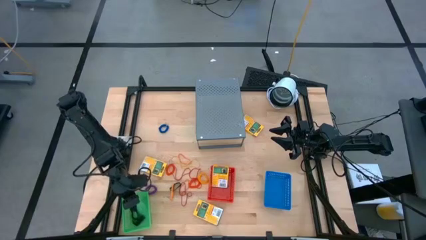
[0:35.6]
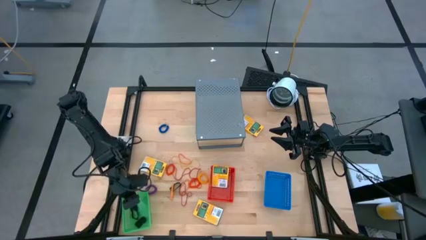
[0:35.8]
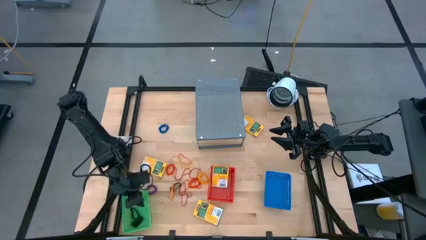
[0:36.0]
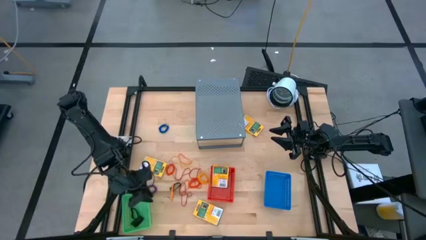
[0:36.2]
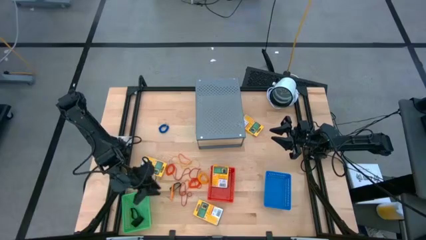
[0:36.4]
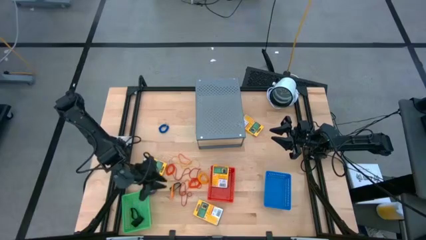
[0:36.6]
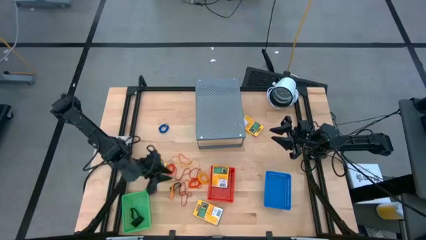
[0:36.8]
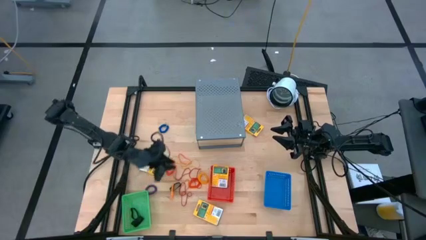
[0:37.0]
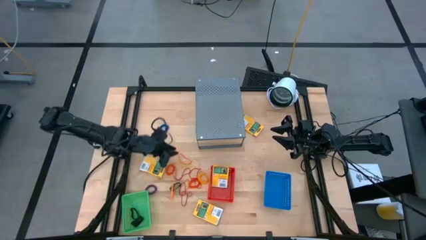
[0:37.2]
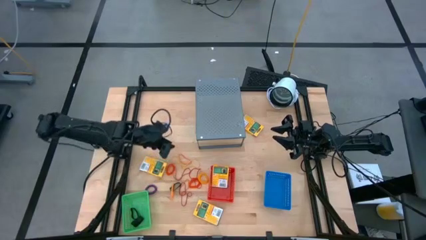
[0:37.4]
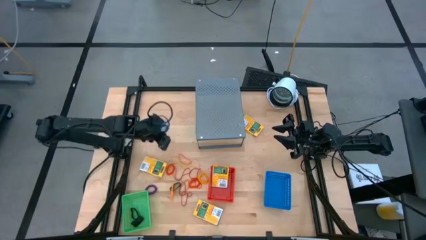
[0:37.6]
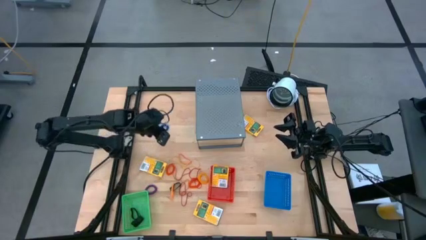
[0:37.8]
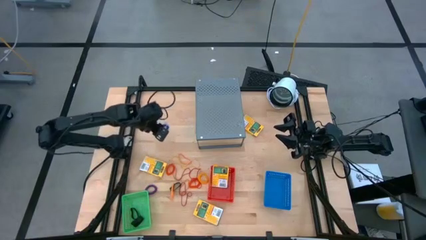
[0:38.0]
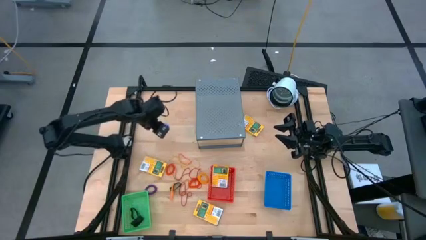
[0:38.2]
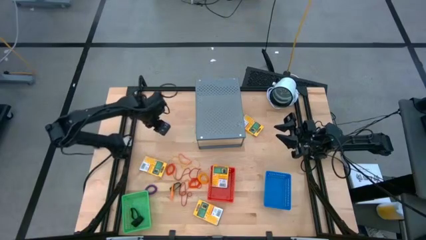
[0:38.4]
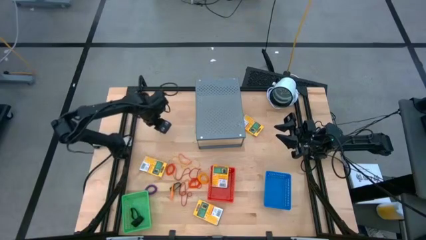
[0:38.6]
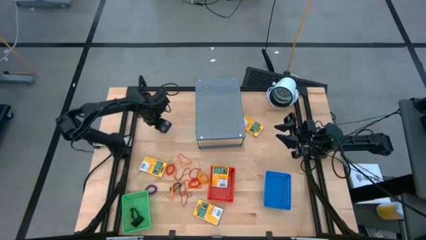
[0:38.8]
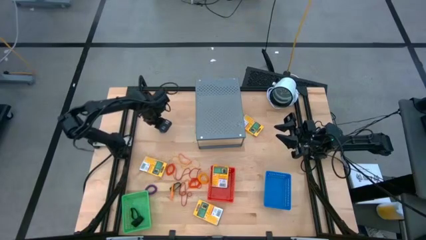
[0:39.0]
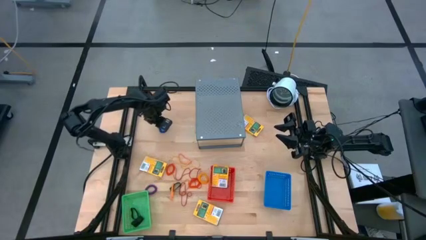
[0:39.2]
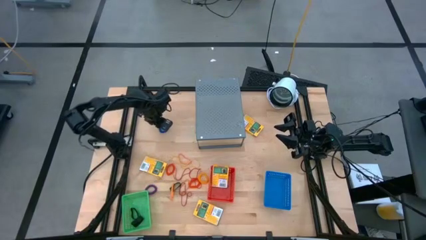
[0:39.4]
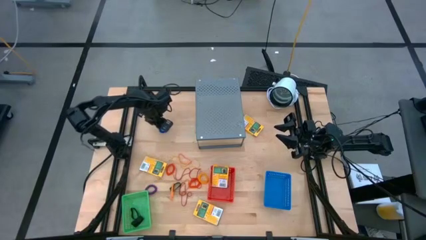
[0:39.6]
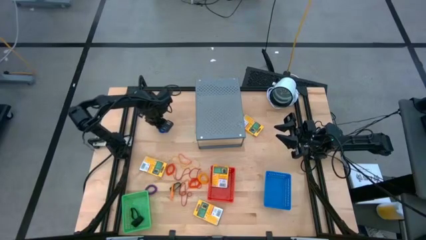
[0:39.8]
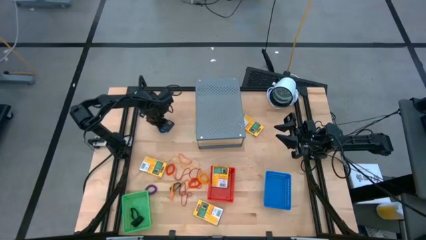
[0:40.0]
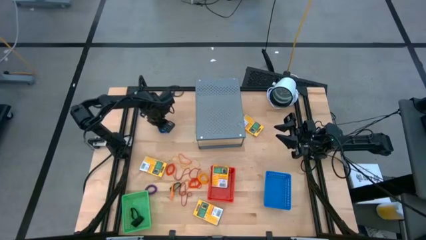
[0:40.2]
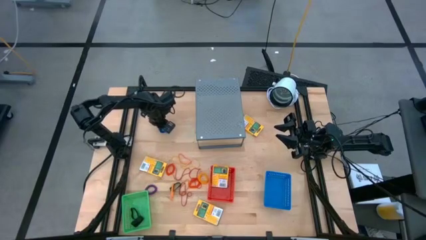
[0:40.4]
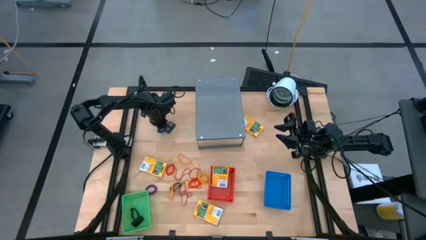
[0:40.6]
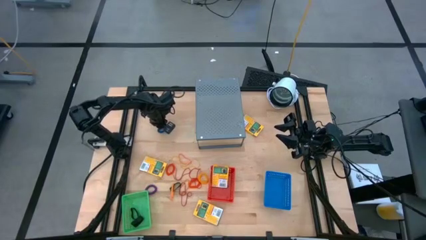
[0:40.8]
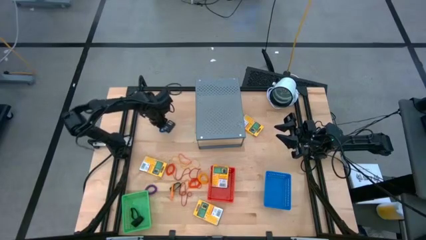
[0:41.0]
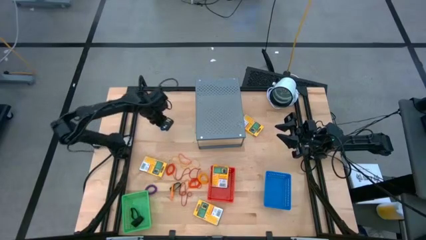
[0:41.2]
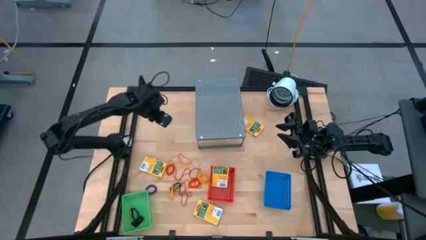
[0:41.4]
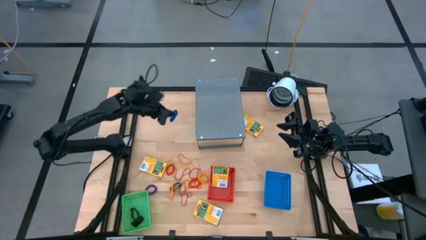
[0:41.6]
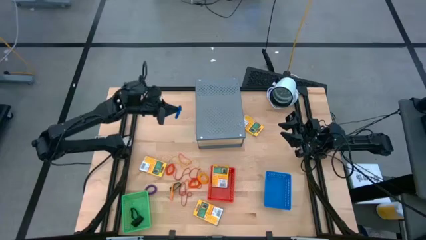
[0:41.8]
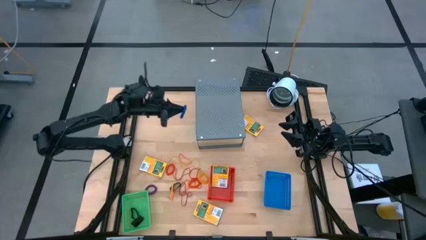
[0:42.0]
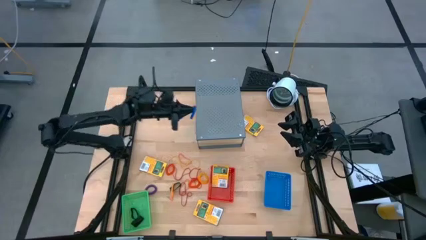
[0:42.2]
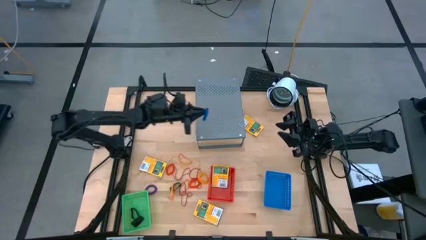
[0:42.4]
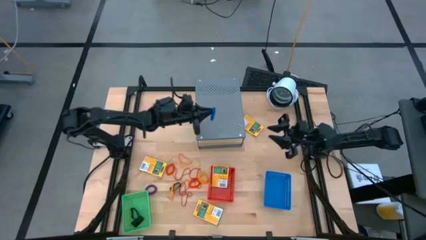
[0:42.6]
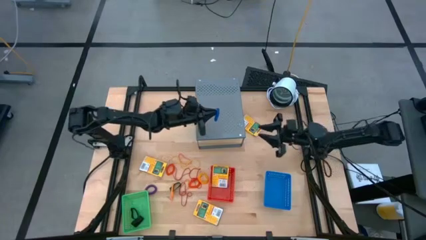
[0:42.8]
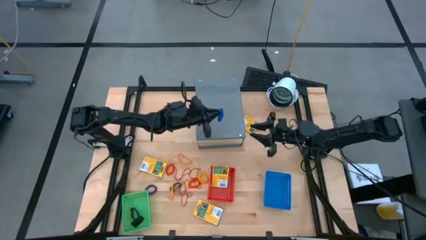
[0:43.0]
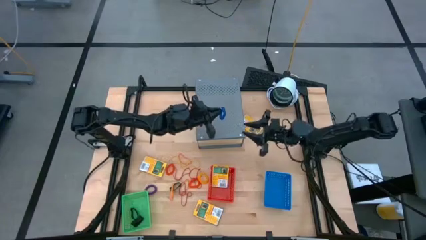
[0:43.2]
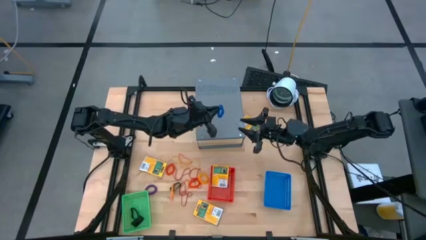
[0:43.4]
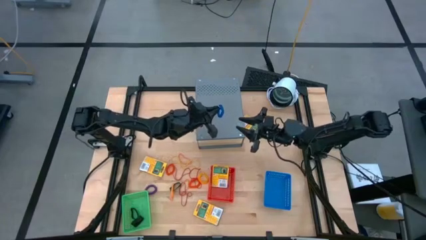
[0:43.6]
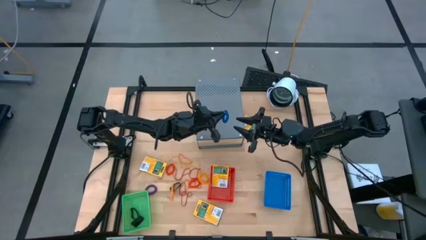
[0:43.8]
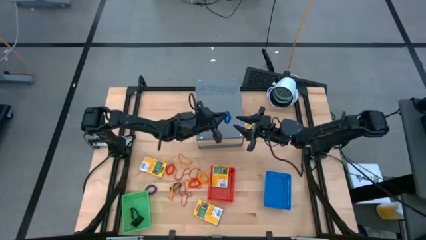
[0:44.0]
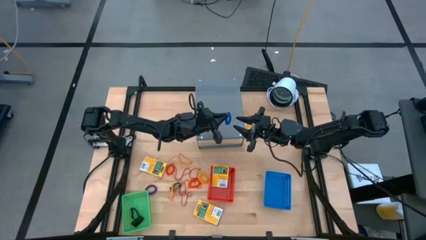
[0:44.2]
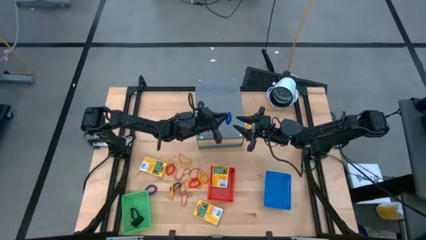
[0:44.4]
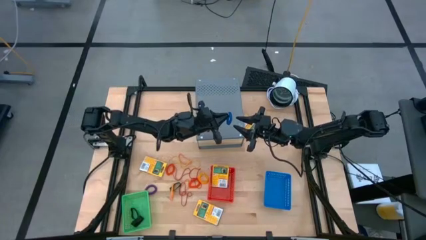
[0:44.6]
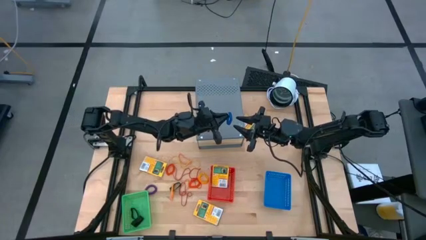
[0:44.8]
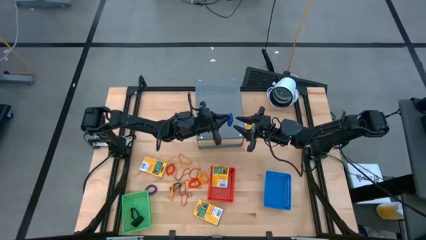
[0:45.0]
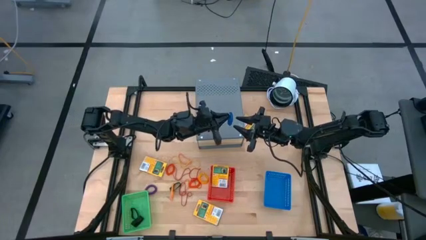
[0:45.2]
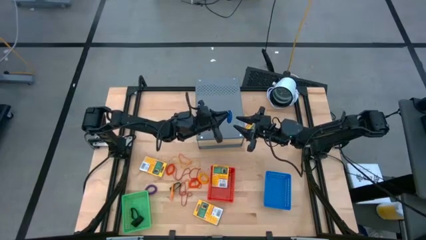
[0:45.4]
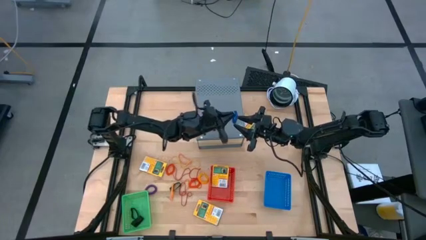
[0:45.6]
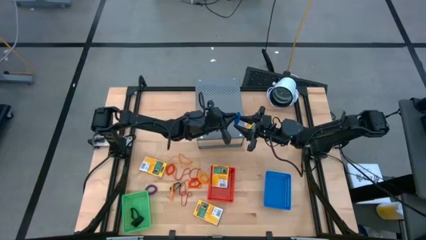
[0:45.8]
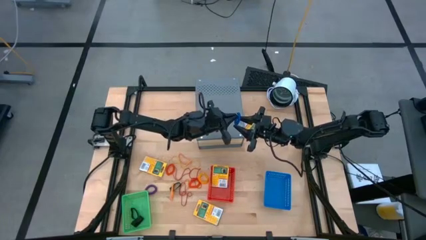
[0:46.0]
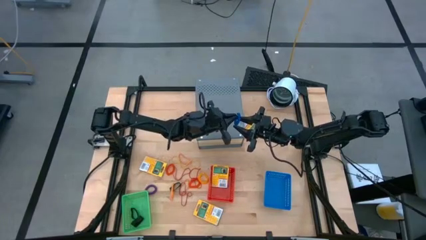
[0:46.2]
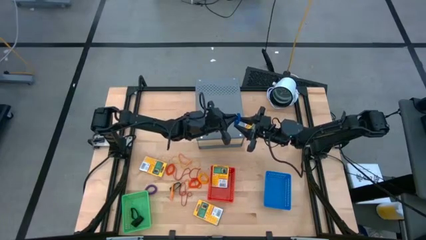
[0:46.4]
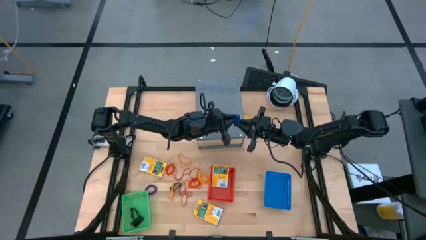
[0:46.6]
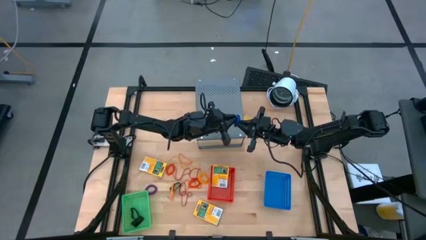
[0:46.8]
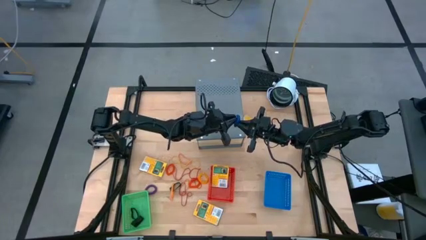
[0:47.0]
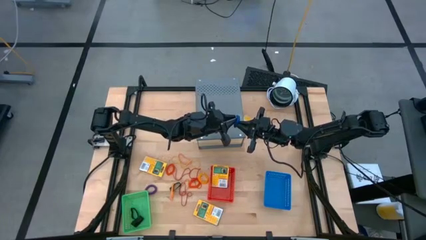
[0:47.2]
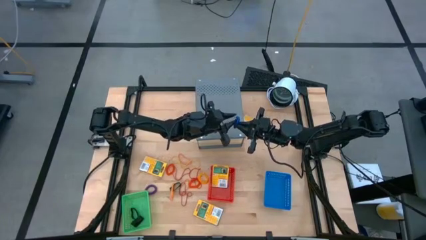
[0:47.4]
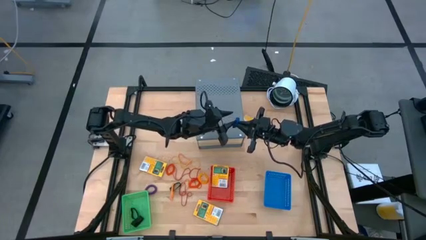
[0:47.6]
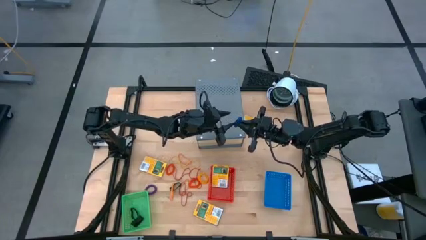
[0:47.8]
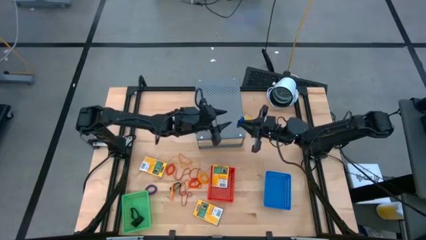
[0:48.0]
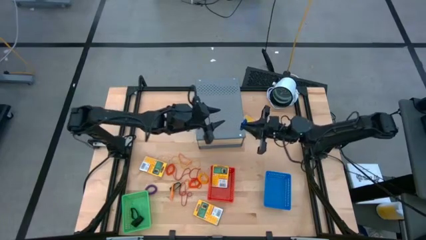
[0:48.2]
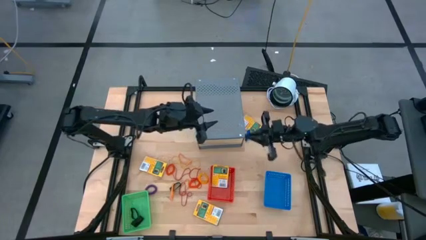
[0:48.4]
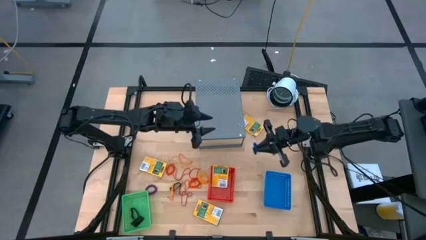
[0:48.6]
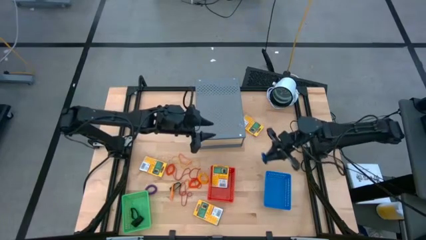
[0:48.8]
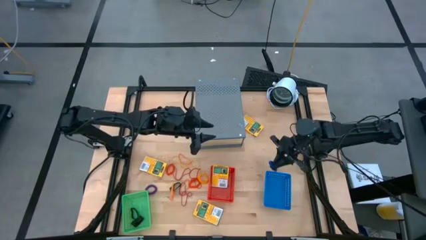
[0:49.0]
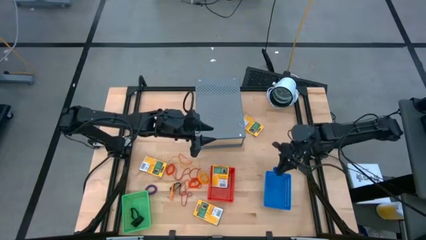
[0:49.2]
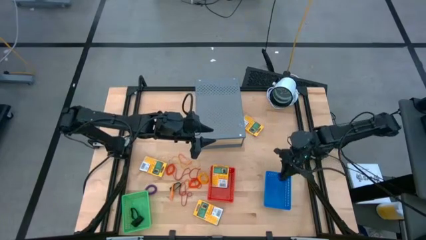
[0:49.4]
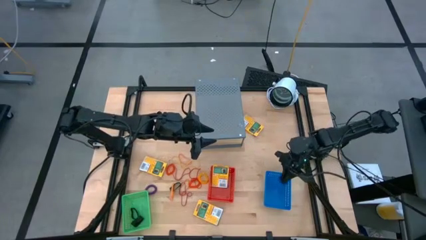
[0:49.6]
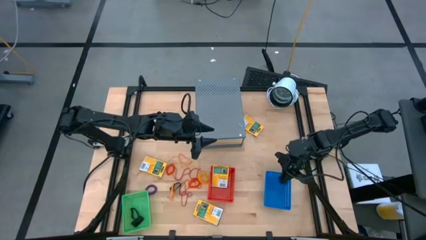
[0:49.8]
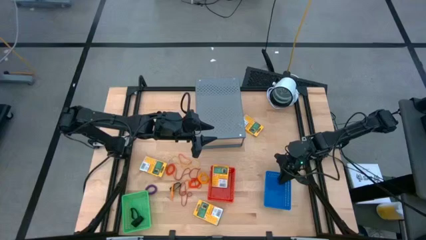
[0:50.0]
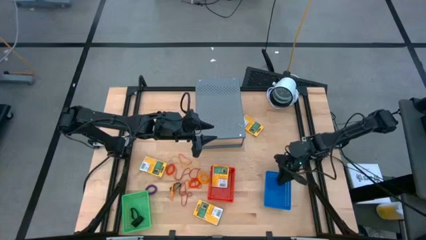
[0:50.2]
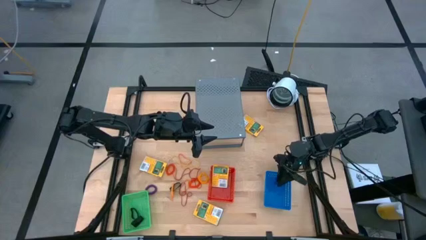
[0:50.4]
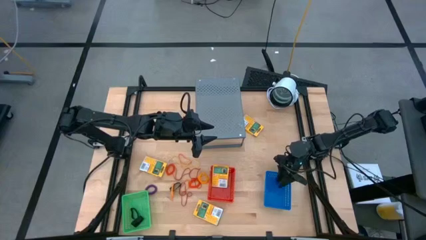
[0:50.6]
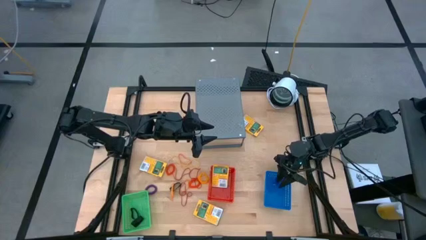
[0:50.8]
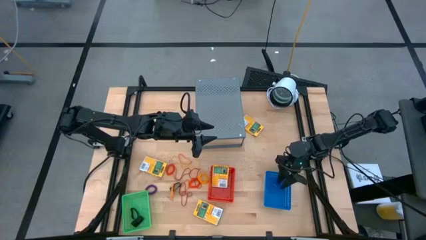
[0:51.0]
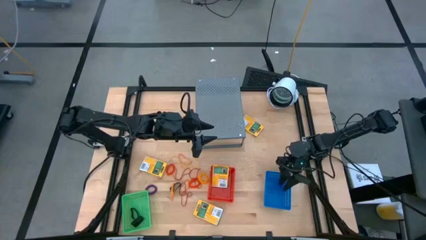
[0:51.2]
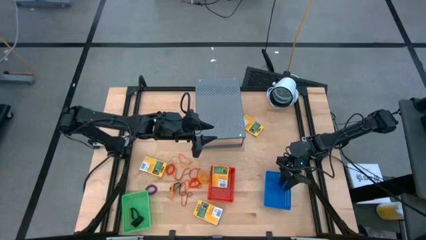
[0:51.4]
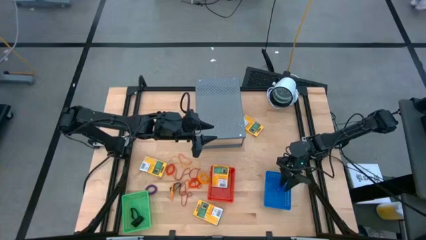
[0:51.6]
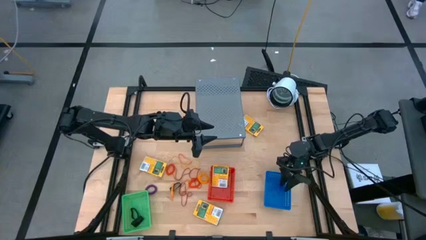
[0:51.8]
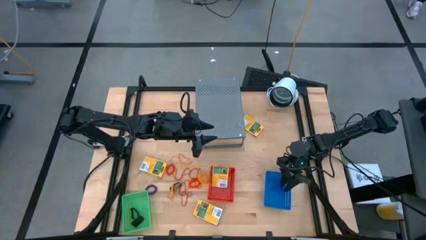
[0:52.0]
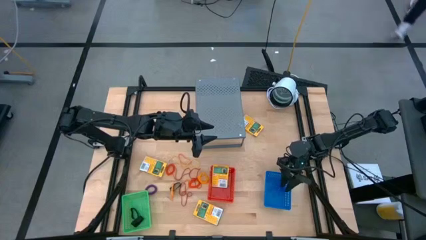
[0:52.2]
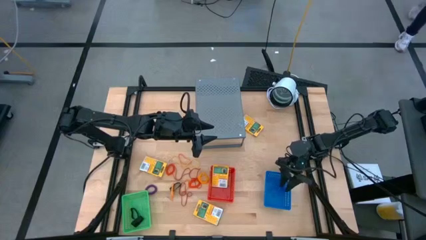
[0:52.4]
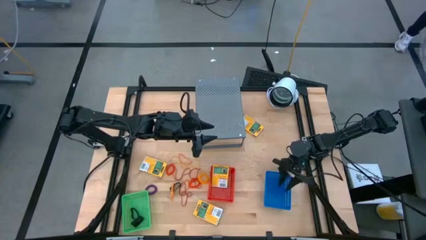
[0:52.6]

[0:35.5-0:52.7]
Task: Pick & Place Office Desk Supplies
Put the blue spring keychain into the blue bin
